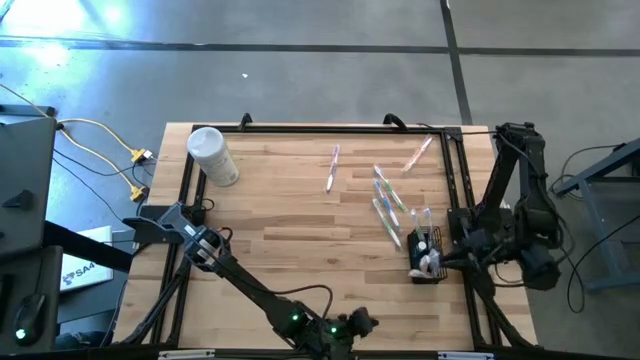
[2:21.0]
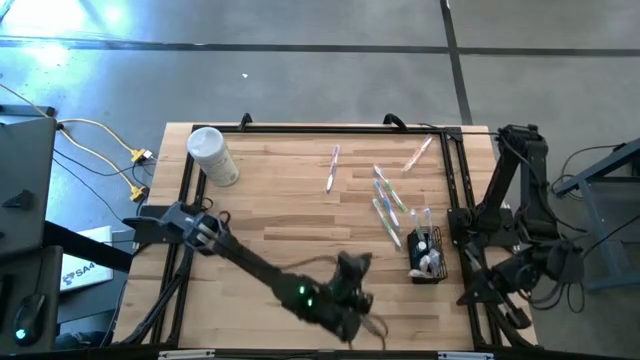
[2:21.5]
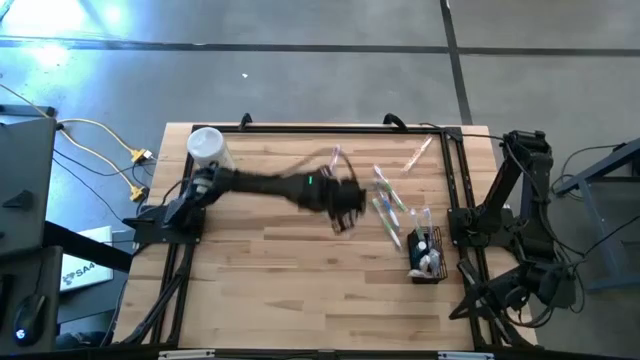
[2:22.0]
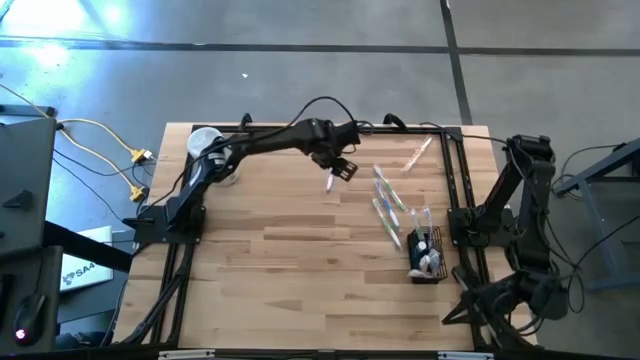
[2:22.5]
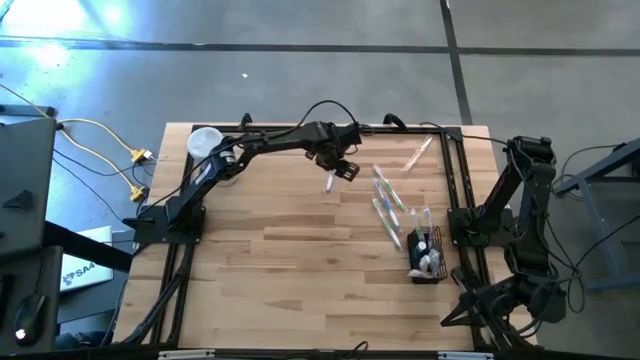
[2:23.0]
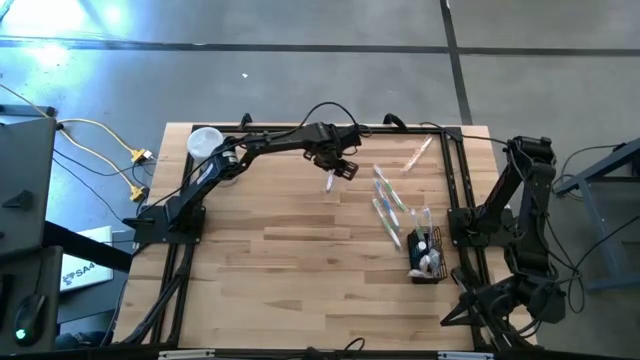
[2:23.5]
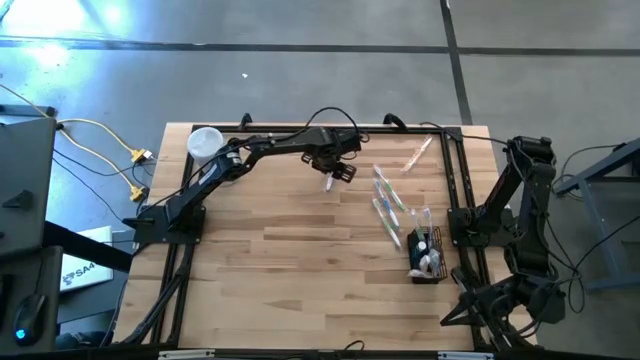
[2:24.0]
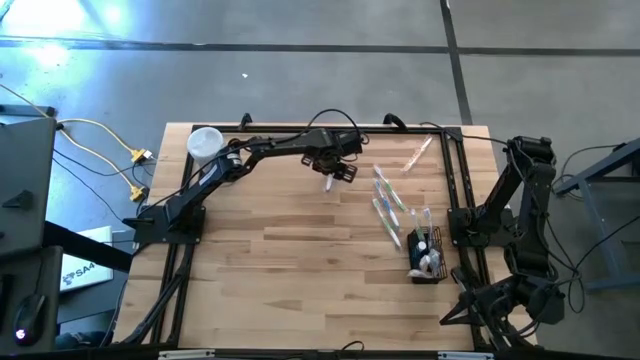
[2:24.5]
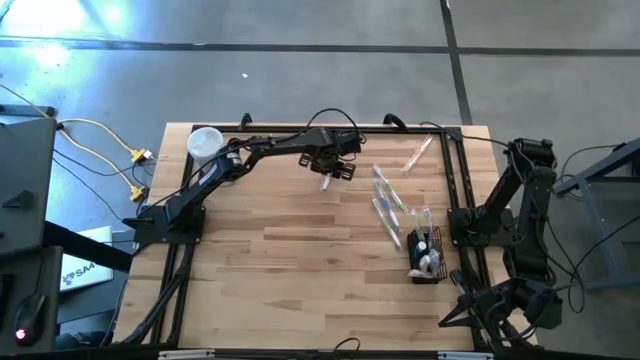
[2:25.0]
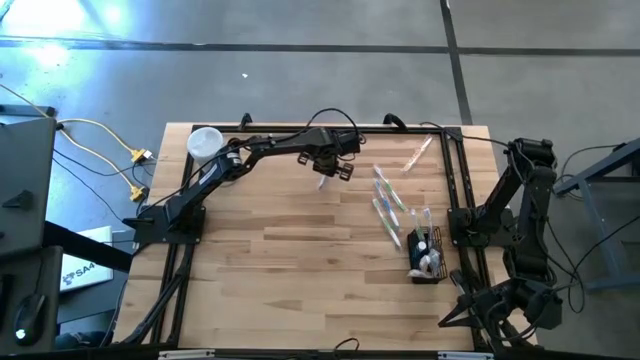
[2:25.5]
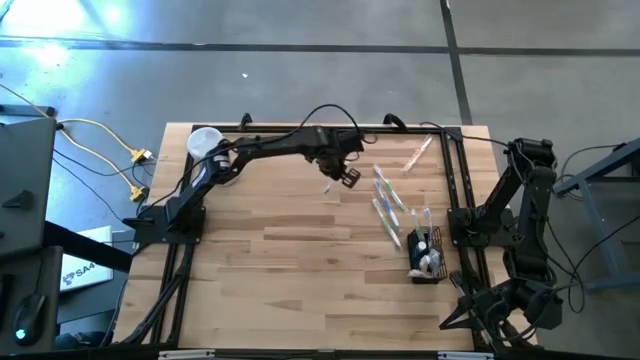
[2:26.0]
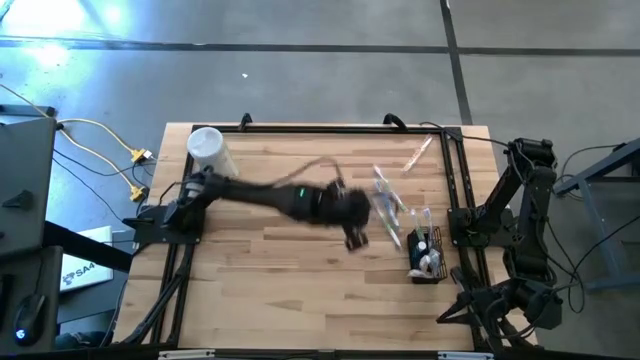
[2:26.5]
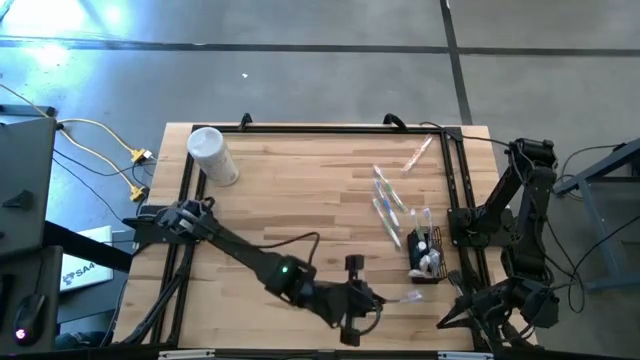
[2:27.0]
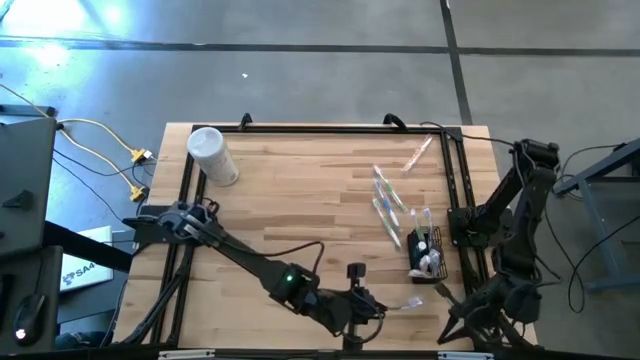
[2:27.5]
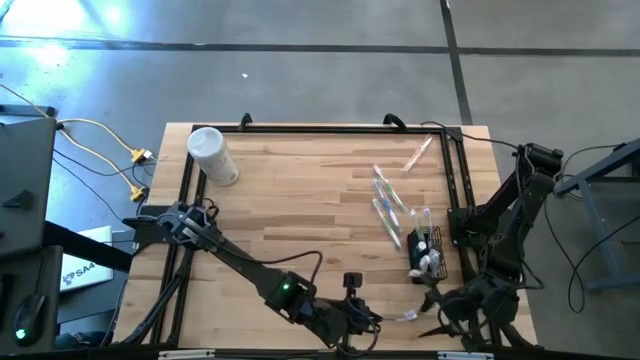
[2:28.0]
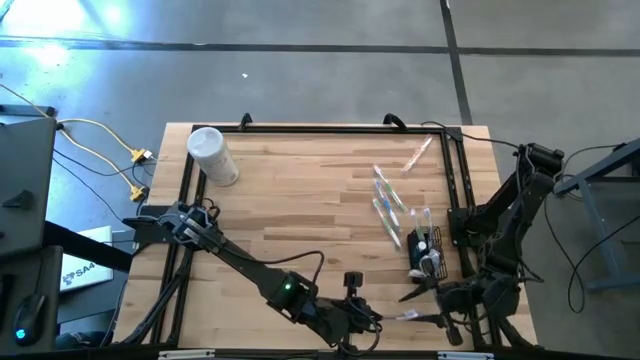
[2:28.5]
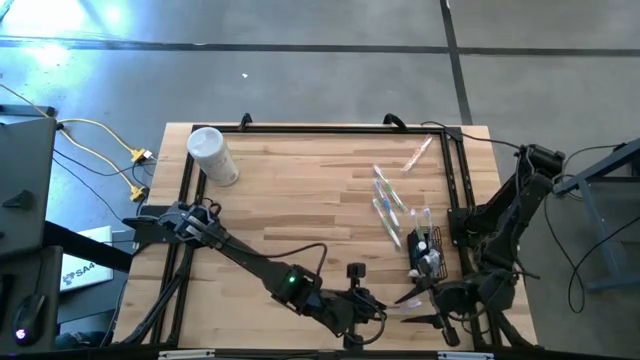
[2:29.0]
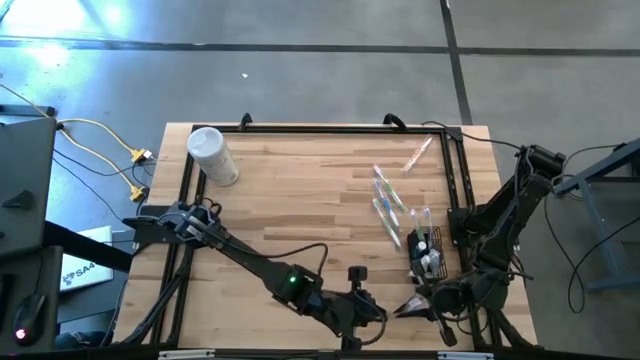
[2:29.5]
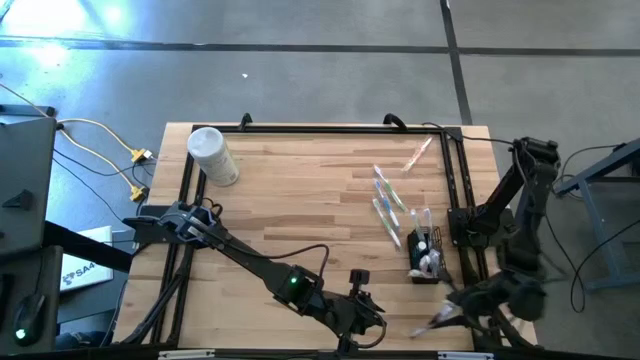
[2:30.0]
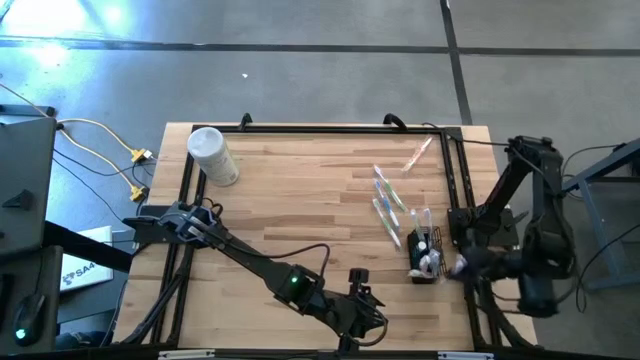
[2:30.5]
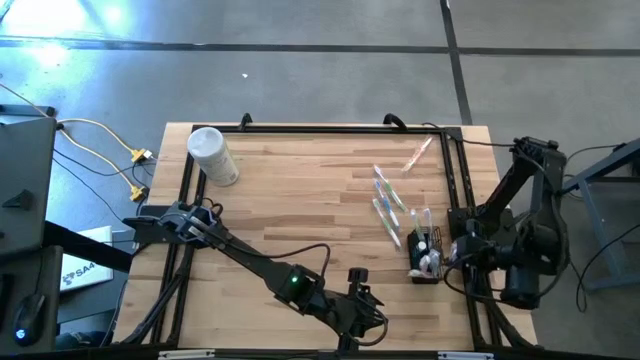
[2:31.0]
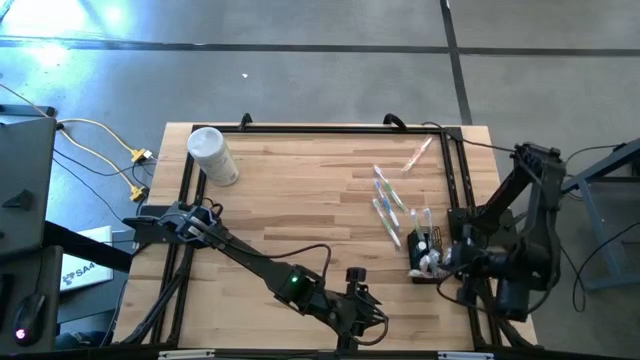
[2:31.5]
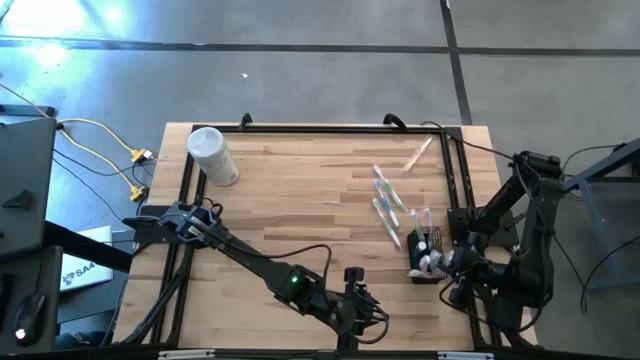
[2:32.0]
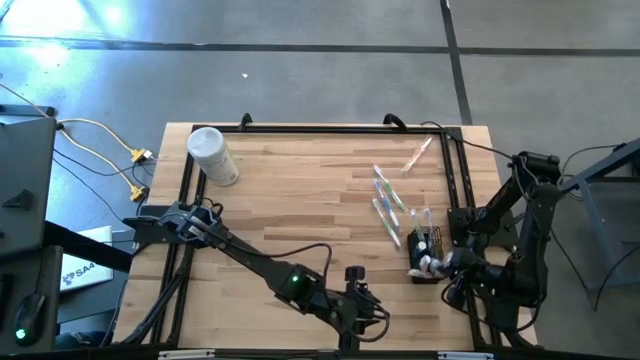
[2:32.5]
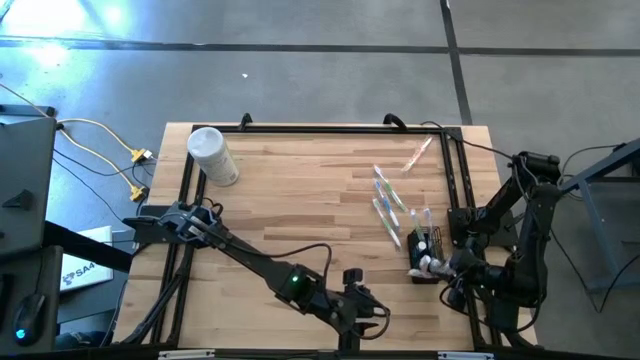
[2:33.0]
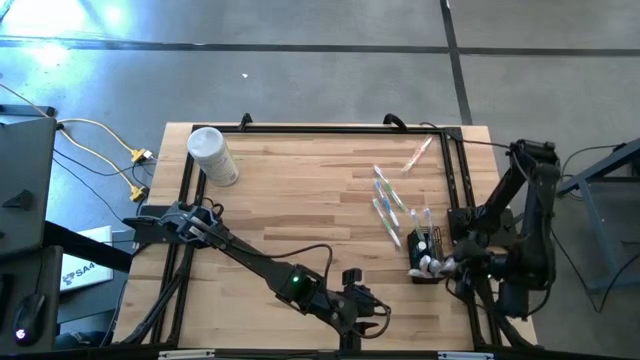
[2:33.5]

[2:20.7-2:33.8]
Task: Pick & Place toothbrushing station
Put the purple toothbrush into the black mesh organizer

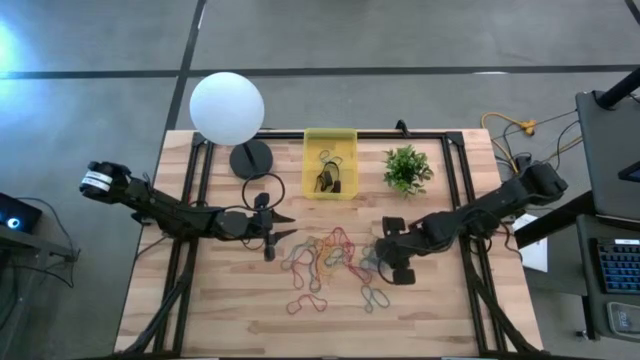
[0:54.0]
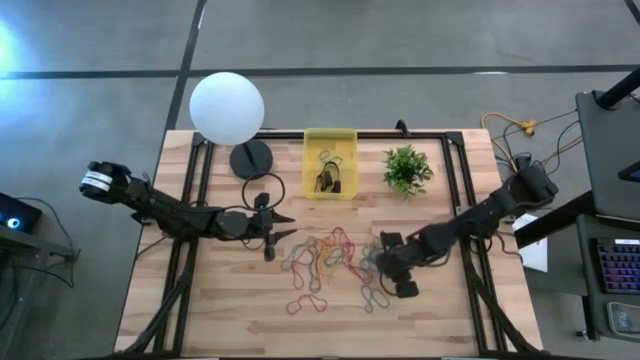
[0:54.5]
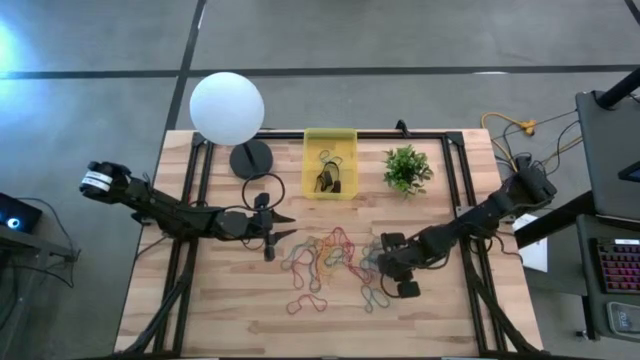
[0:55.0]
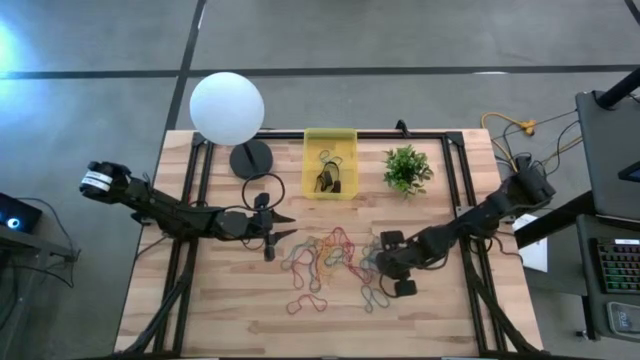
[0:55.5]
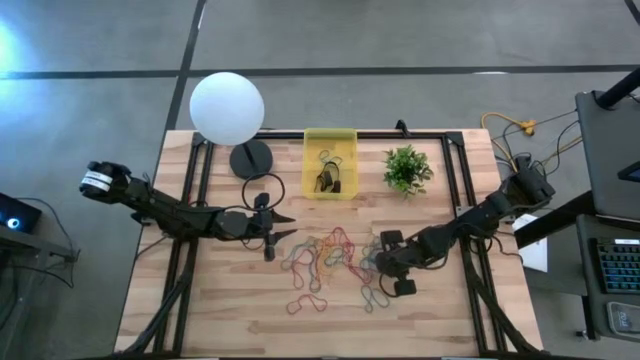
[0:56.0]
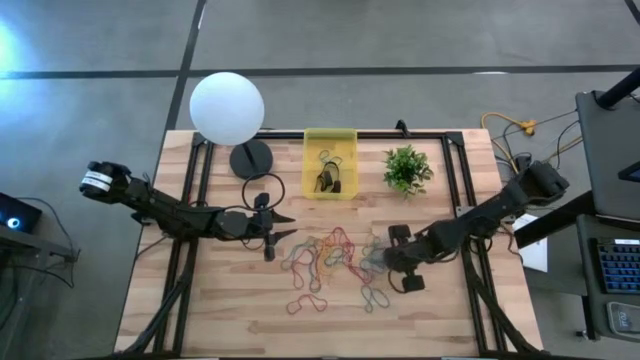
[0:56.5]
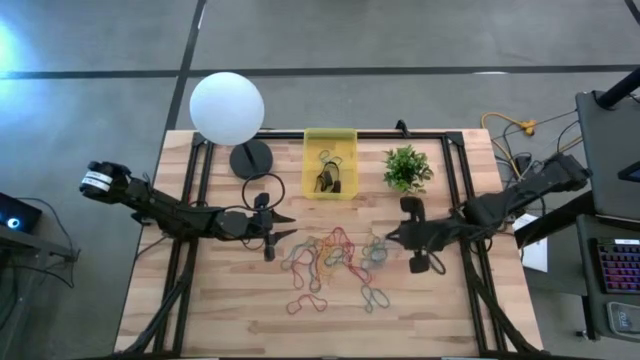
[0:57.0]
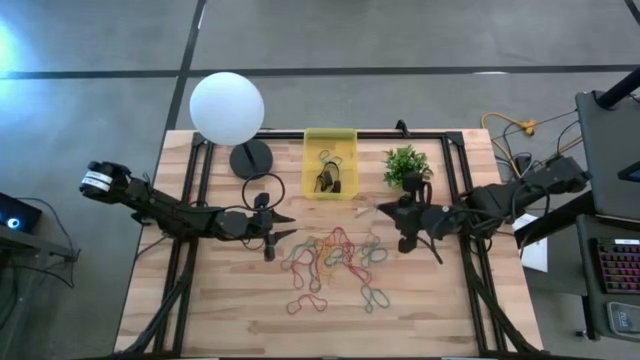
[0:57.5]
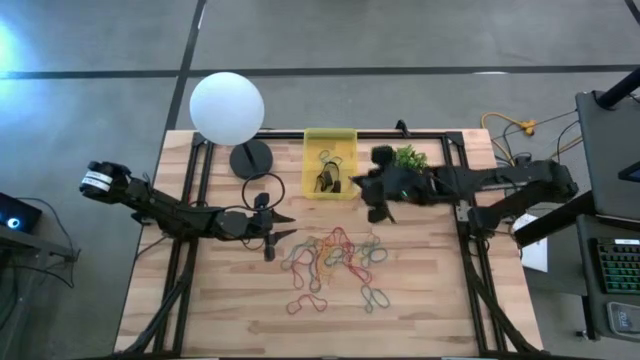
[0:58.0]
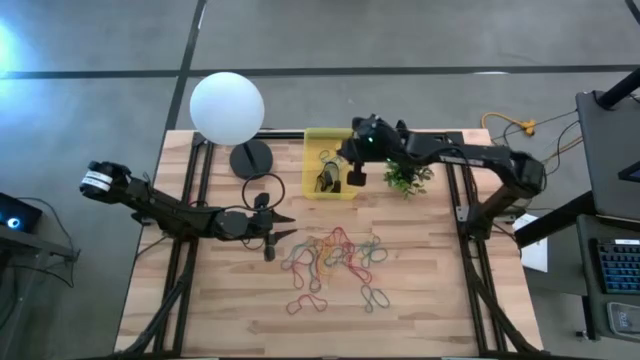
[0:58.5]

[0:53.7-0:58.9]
Task: Pick and place rubber bands into bin
Put the blue rubber band into the yellow bin

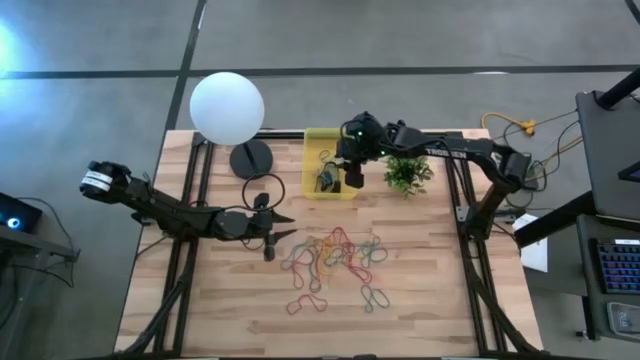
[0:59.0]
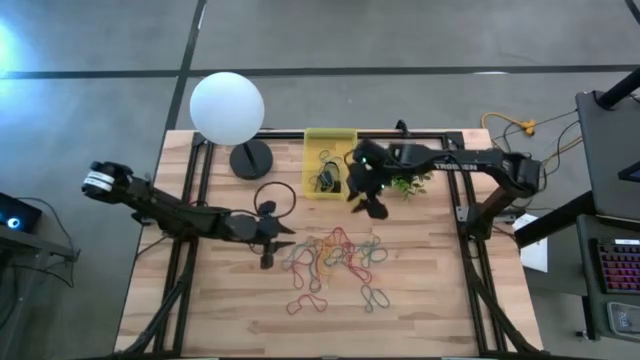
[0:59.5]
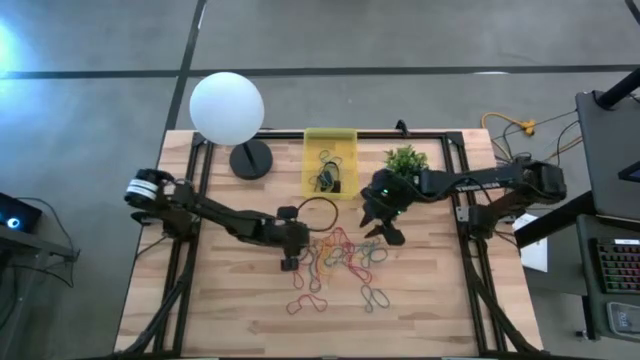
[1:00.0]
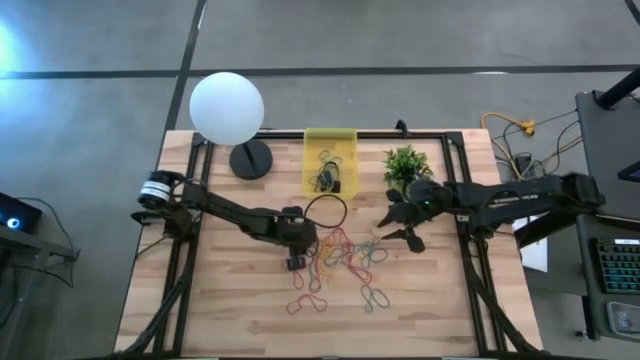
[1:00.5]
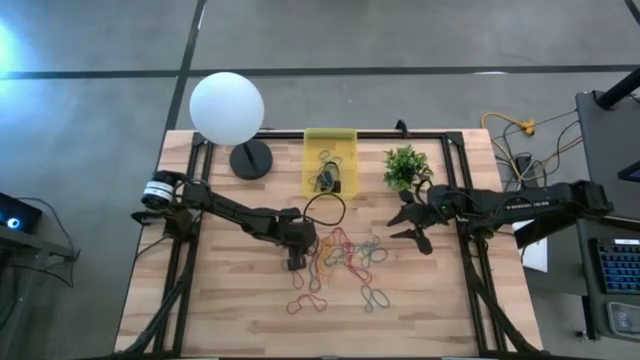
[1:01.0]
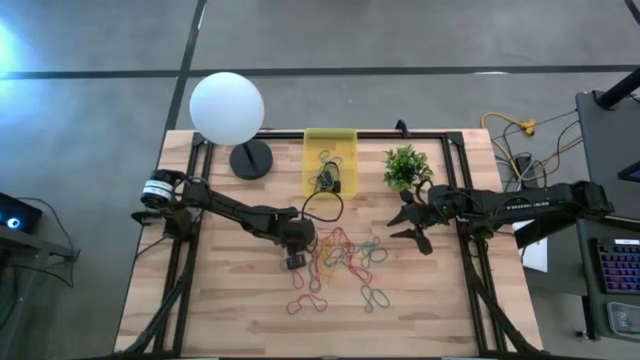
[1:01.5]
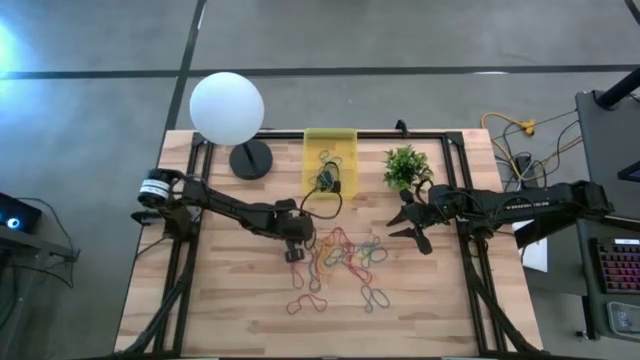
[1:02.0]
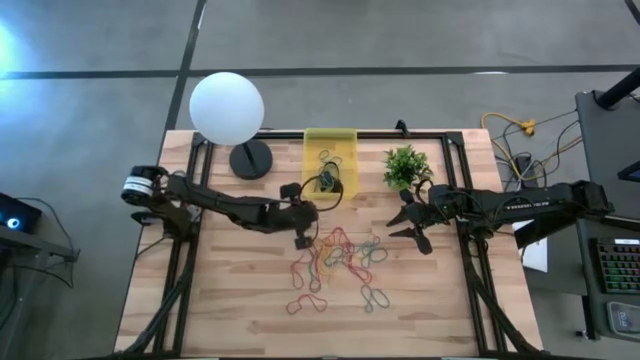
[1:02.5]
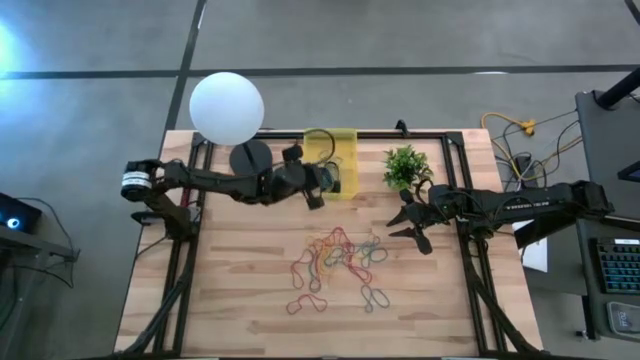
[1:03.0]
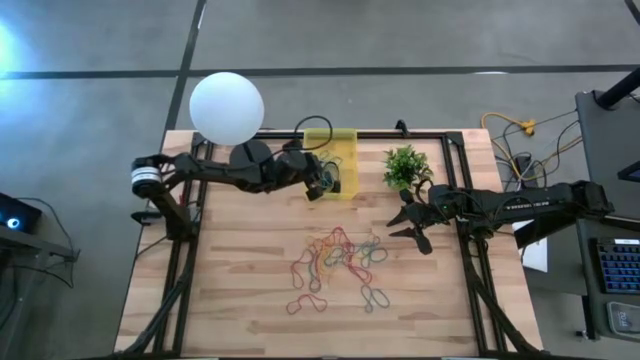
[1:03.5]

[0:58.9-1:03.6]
Put the blue rubber band into the yellow bin
